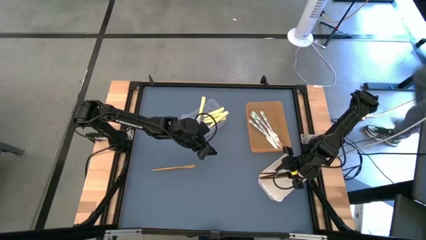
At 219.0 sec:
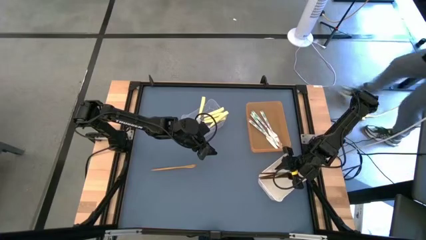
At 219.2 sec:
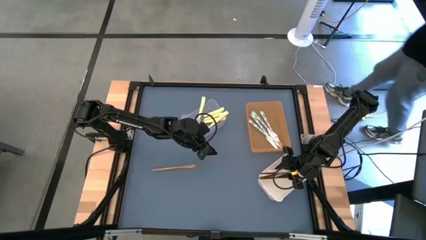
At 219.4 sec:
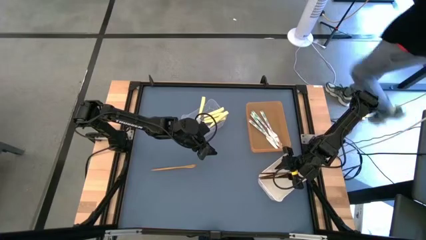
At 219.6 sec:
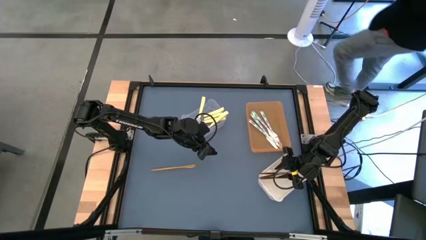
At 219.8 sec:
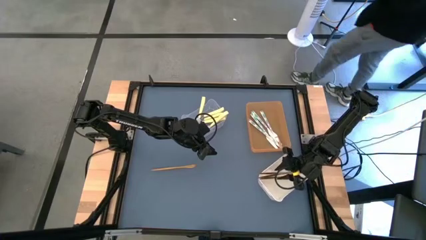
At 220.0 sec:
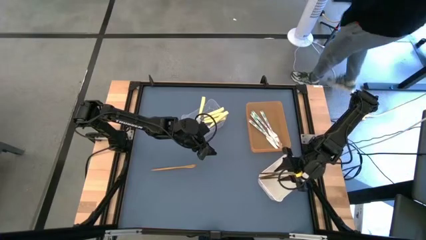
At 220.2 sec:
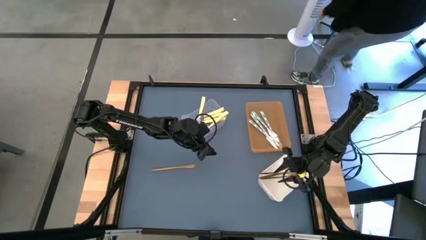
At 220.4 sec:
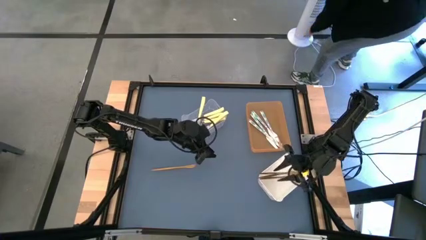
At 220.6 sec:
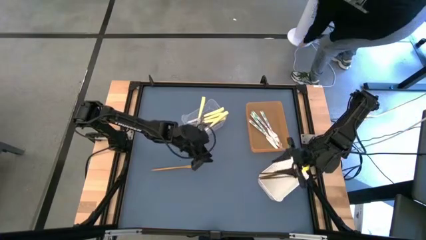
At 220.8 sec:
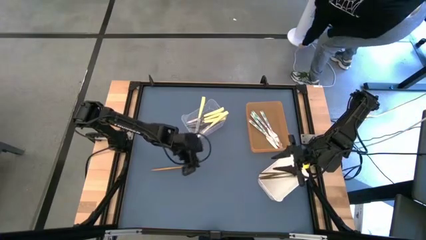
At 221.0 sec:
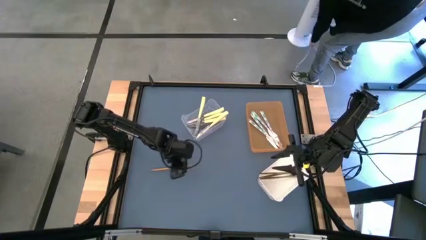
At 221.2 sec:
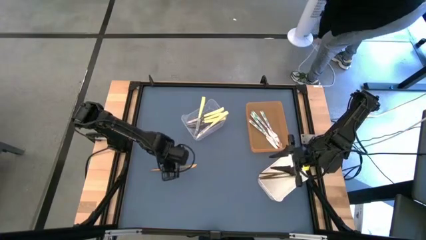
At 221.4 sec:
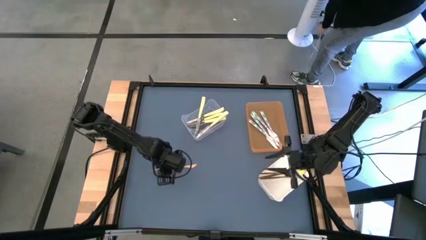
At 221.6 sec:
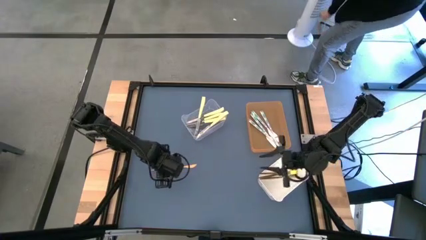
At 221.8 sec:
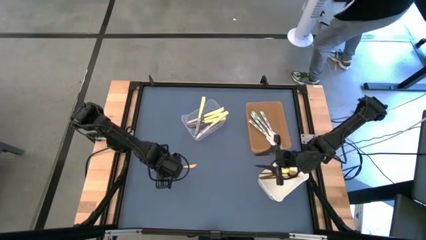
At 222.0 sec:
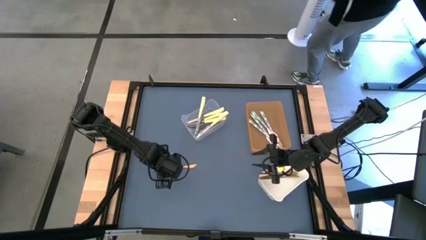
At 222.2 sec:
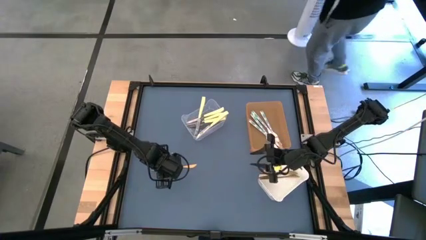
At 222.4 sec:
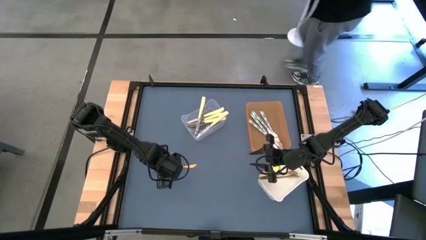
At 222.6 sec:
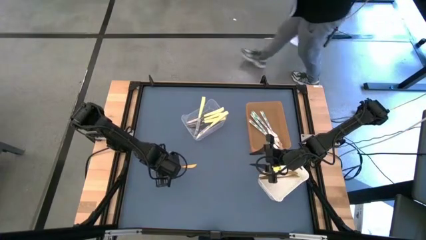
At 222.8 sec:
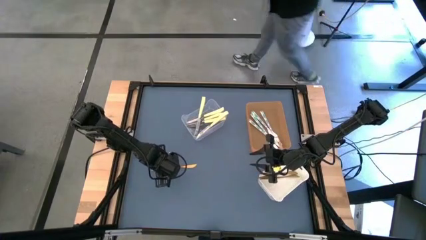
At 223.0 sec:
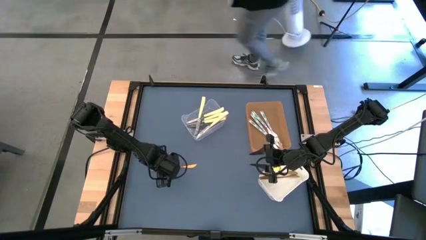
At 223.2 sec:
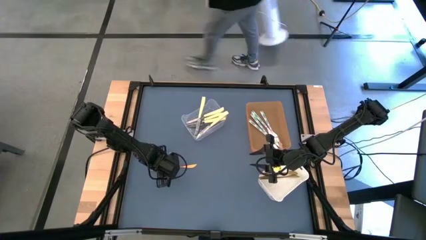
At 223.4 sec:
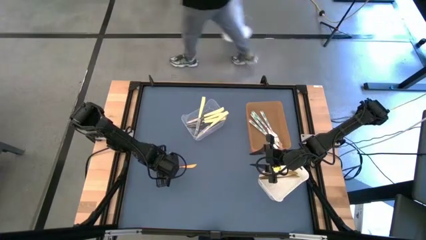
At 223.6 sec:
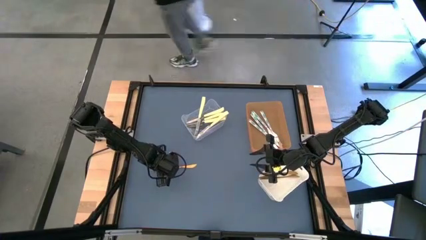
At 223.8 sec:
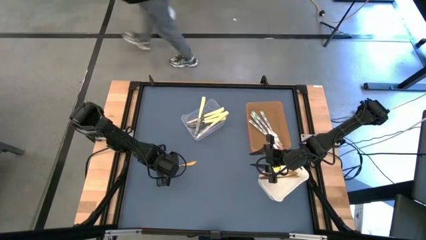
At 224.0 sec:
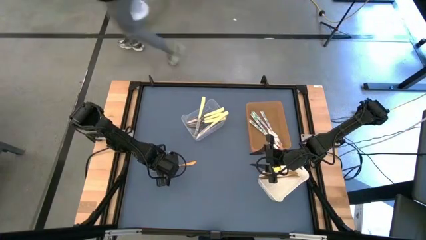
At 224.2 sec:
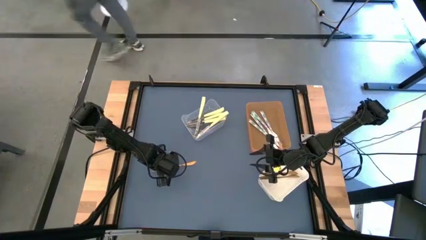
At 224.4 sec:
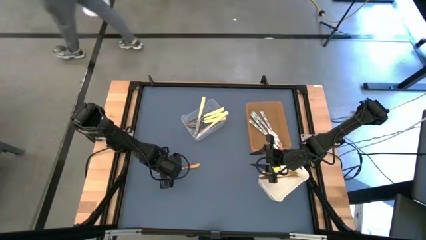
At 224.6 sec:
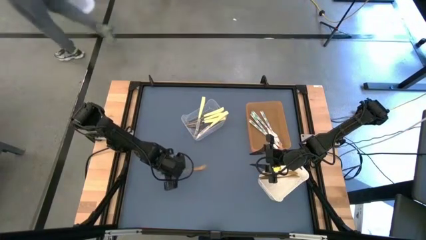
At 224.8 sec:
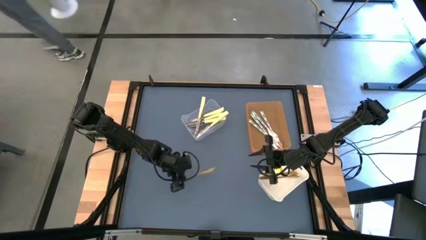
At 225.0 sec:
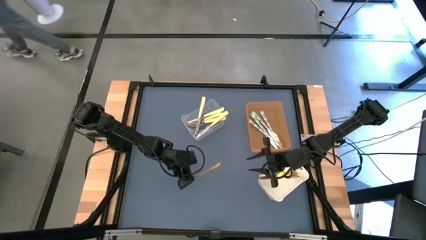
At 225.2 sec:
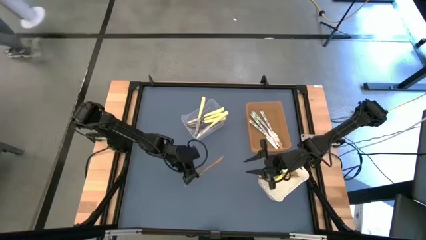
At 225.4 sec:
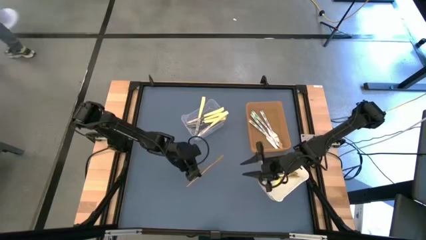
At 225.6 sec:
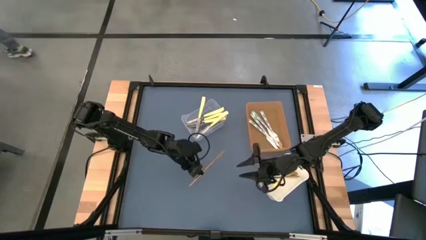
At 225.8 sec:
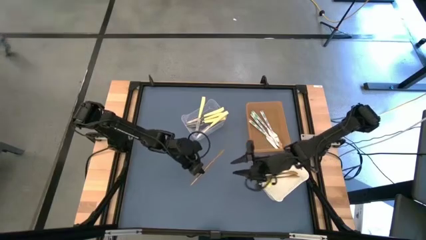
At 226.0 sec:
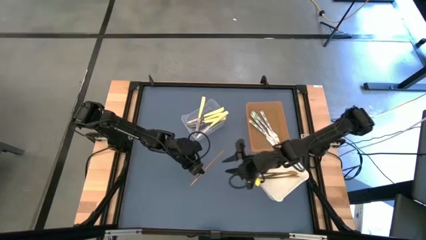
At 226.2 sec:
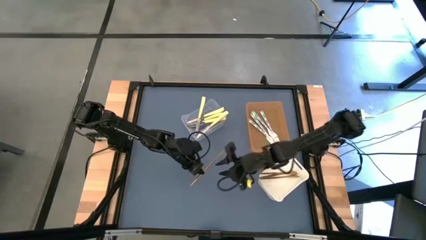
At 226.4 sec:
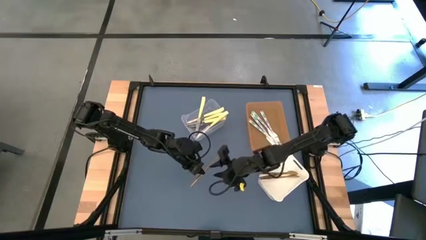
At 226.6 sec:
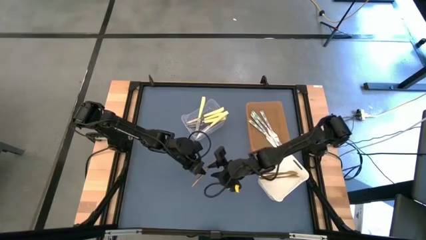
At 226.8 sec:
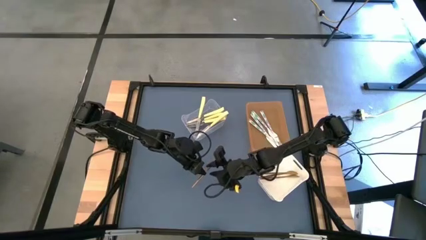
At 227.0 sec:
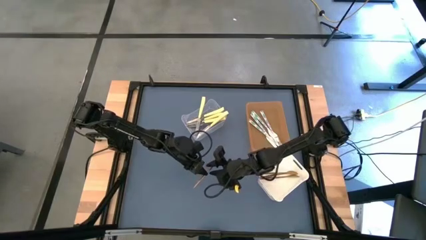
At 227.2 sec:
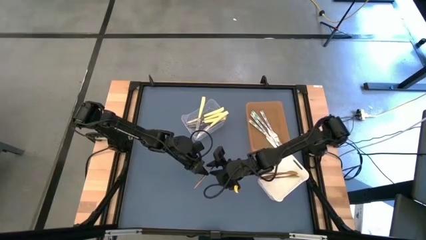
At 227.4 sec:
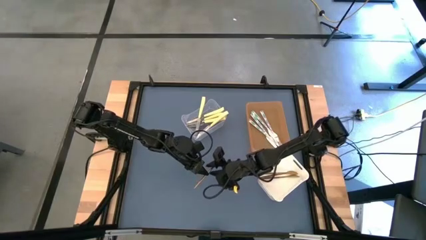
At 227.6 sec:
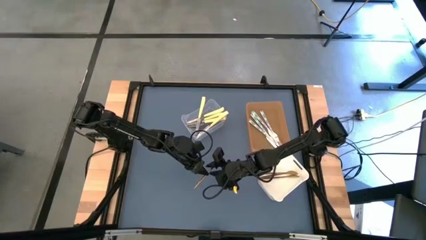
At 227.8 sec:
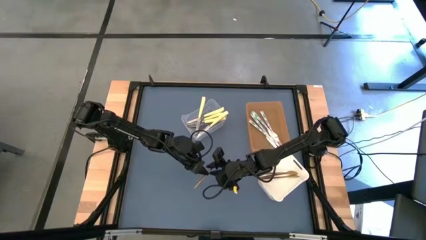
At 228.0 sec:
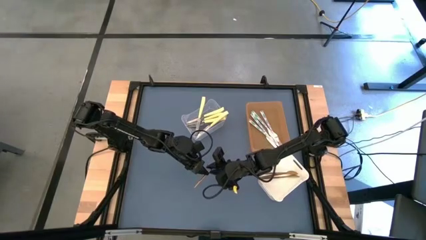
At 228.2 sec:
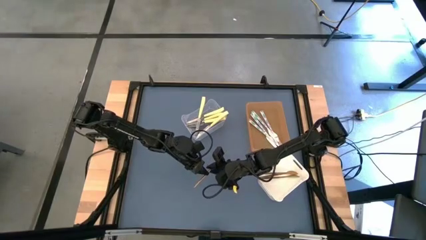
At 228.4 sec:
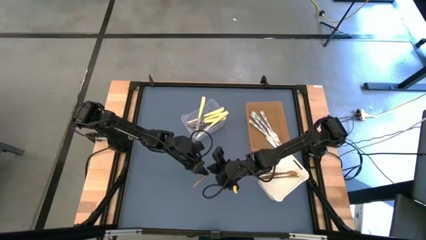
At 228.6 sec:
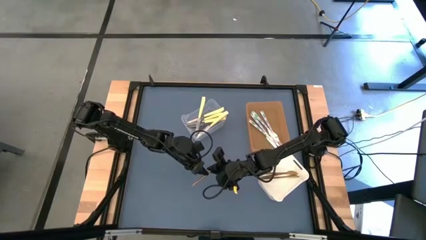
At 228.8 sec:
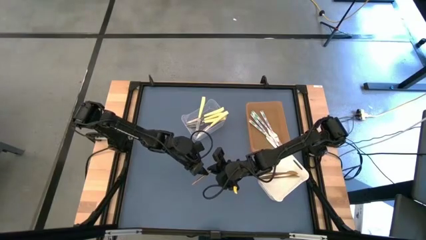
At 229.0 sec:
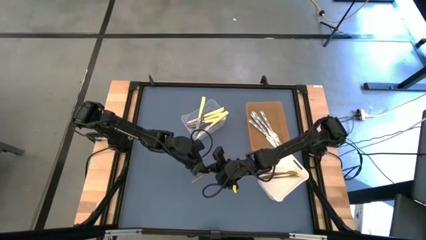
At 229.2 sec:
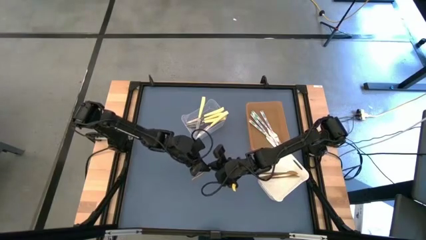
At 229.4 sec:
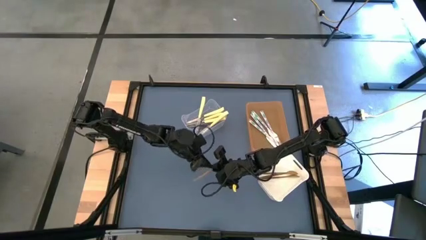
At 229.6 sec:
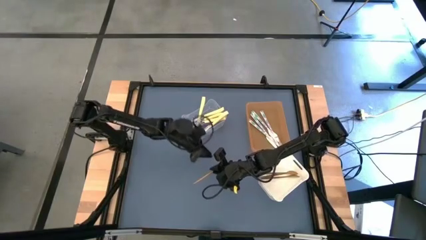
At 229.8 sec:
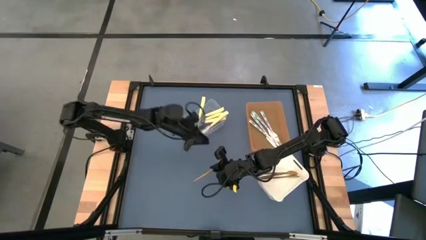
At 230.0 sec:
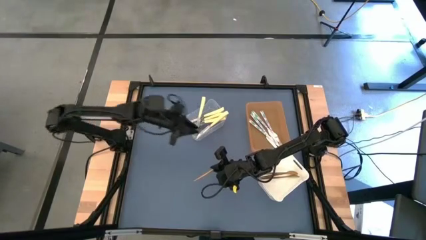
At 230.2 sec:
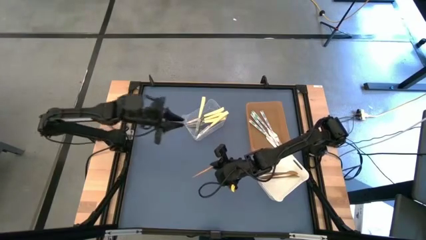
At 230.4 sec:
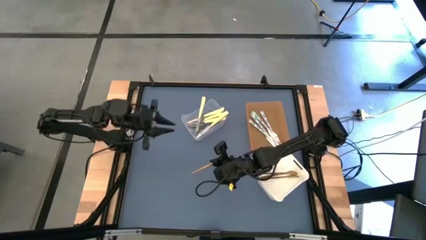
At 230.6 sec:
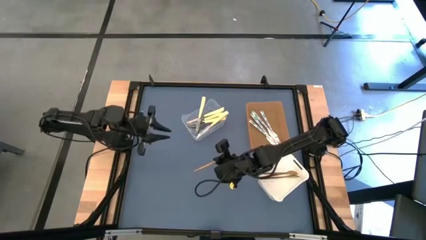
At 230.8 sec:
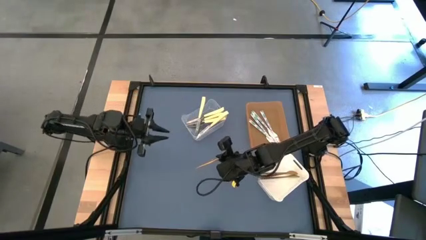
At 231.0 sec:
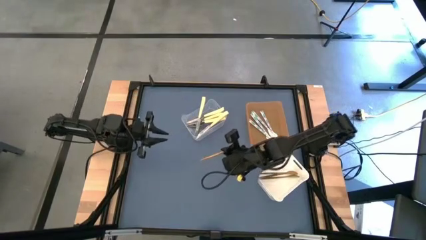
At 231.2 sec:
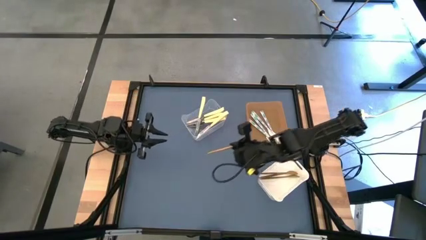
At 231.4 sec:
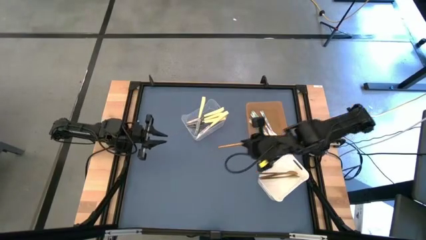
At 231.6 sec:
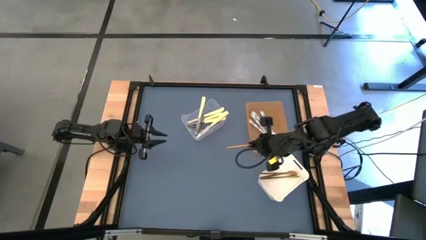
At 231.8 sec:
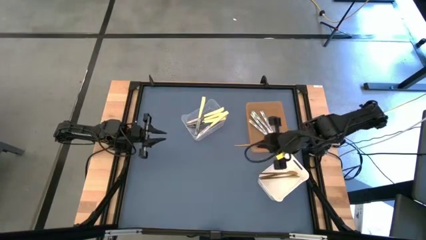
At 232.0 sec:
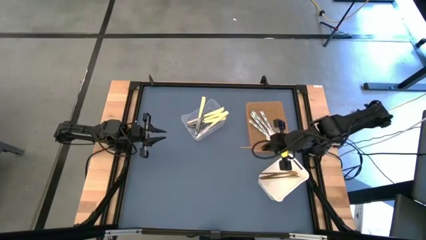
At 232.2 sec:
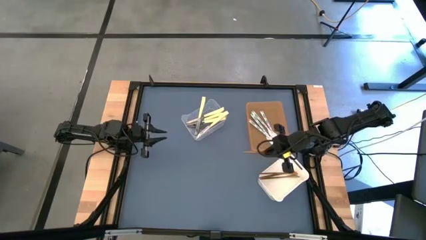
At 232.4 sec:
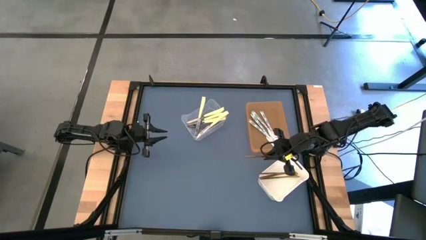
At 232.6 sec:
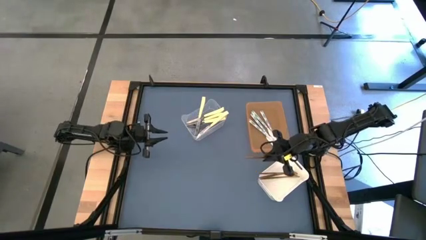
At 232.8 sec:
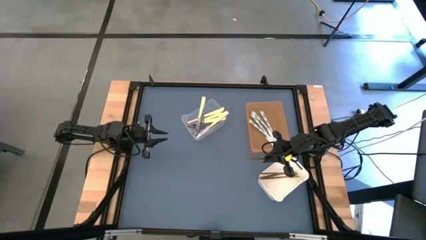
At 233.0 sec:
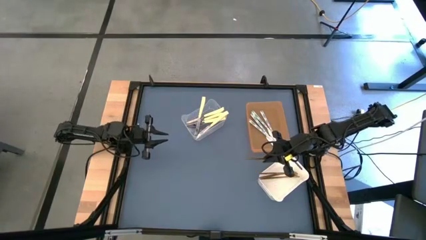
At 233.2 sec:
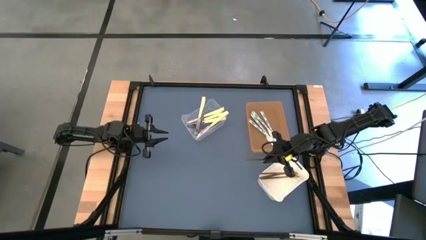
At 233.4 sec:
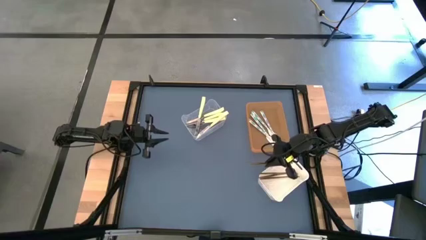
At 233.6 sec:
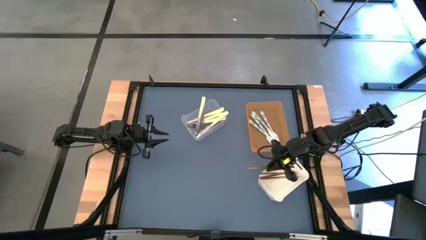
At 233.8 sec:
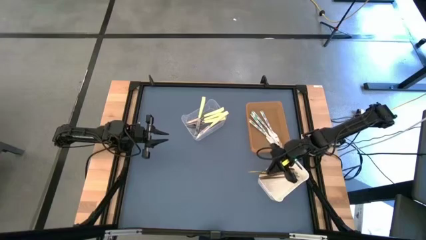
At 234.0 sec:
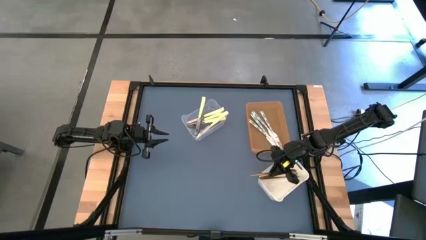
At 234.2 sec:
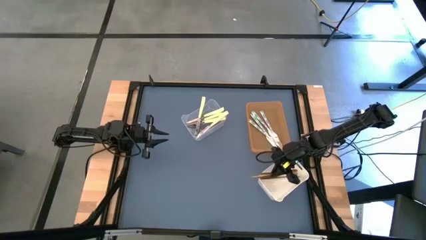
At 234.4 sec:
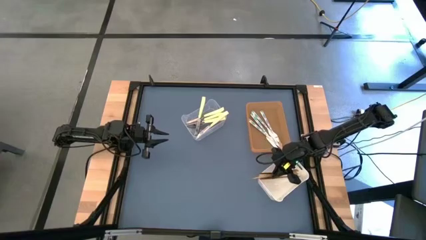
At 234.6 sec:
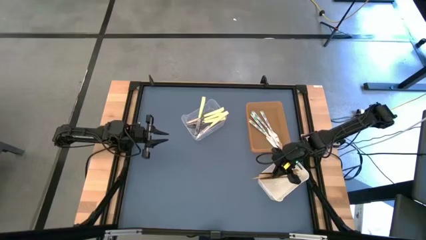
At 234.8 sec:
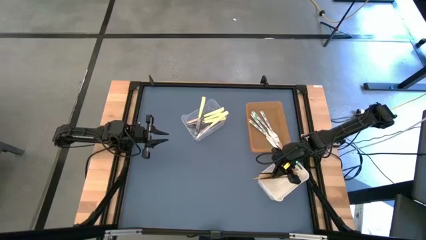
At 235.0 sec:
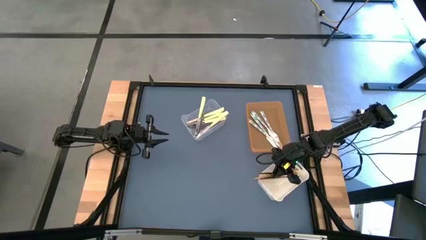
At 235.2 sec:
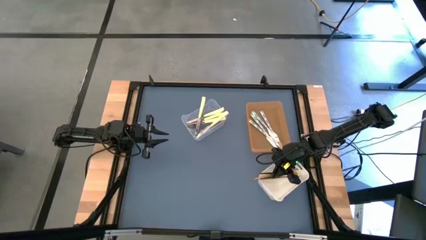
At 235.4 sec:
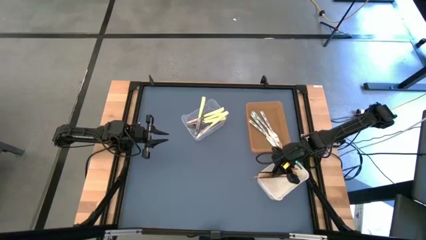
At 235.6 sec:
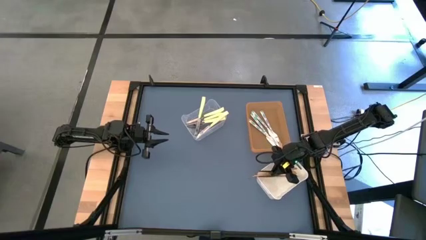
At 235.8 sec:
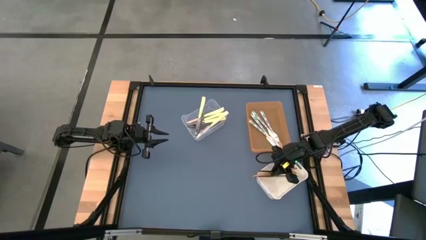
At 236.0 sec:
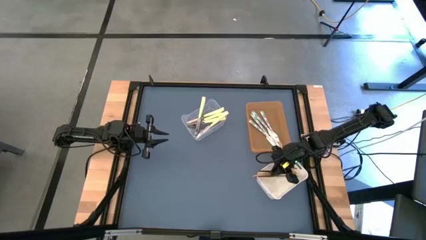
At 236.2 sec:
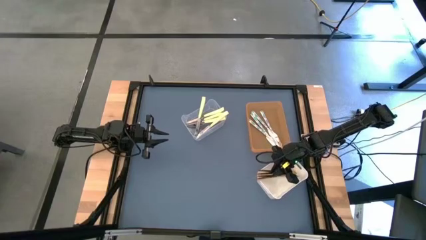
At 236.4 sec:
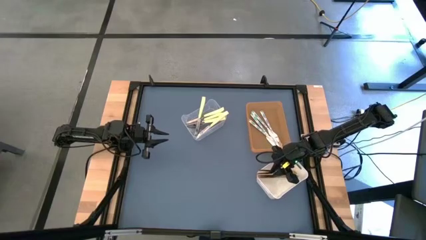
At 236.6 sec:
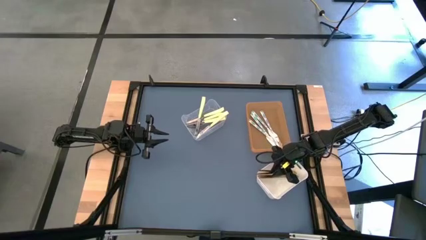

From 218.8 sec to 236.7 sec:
Task: Sort silverware by color (type)
Put the gold knife into the white bin
